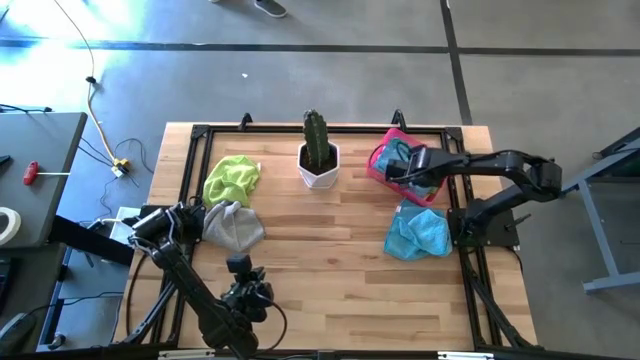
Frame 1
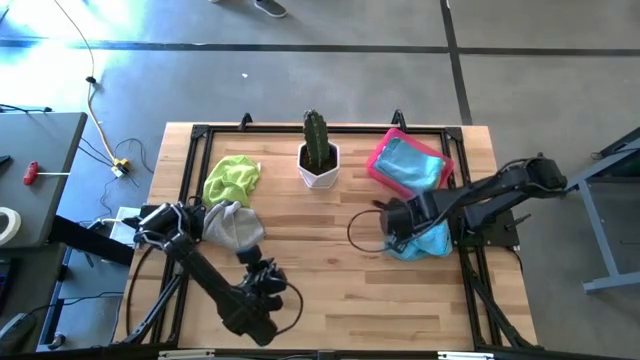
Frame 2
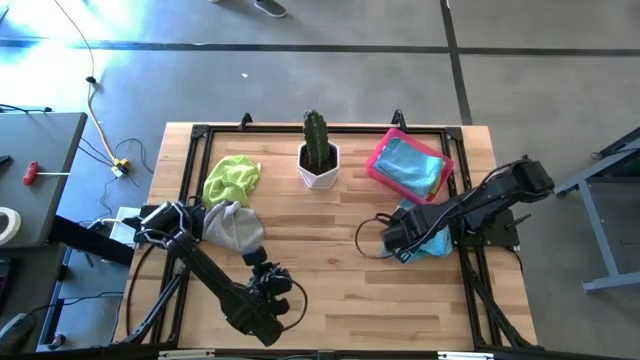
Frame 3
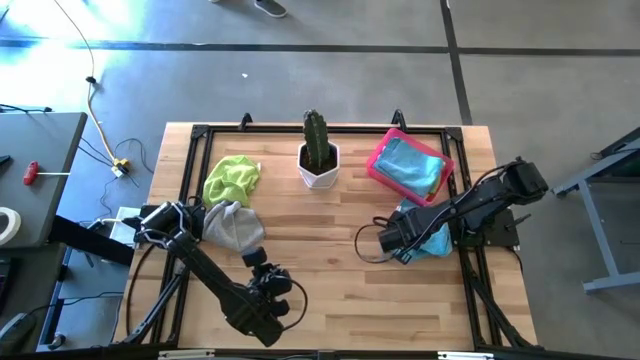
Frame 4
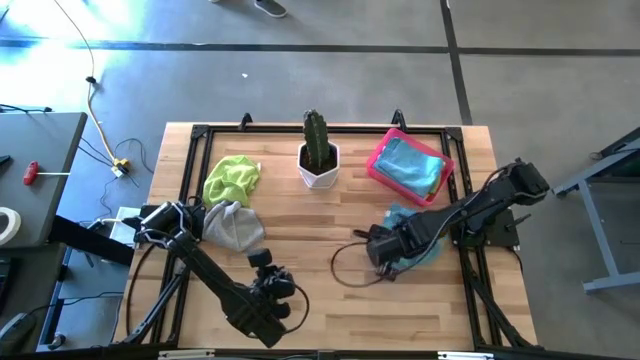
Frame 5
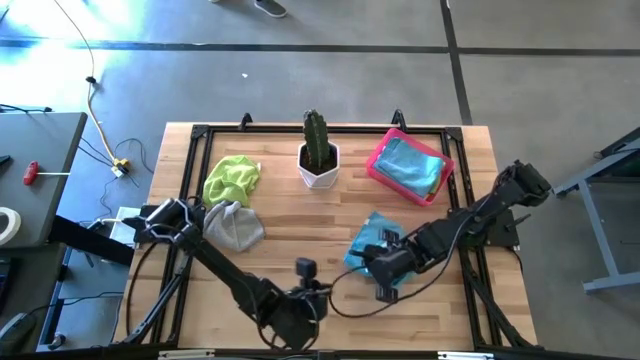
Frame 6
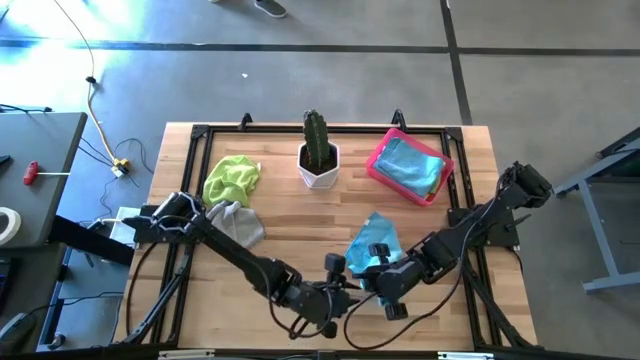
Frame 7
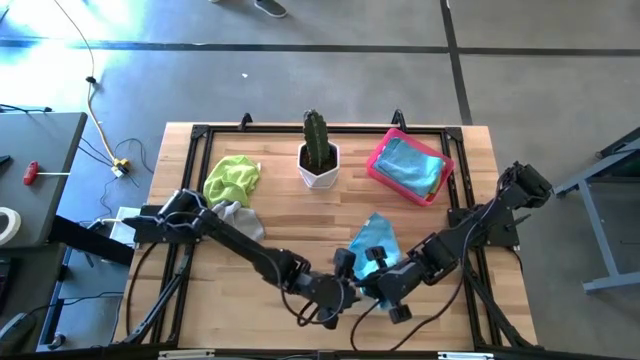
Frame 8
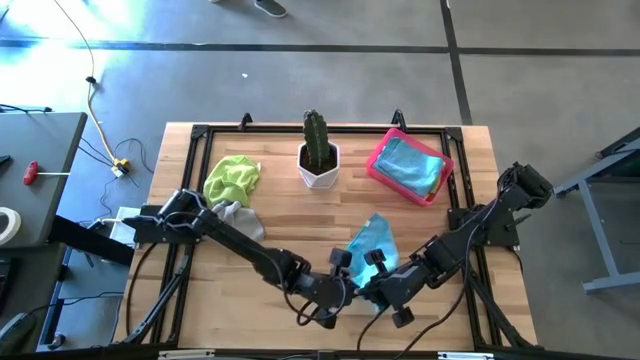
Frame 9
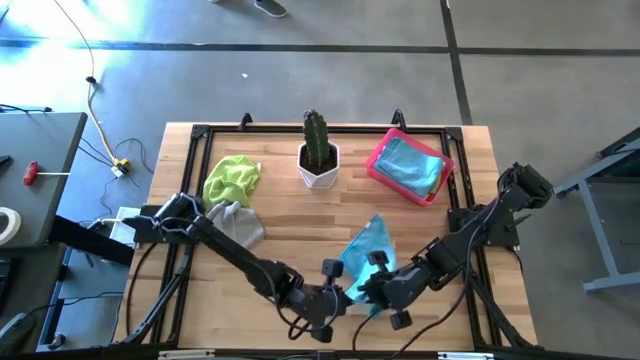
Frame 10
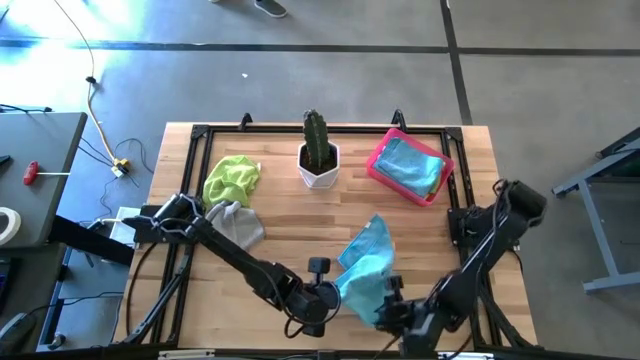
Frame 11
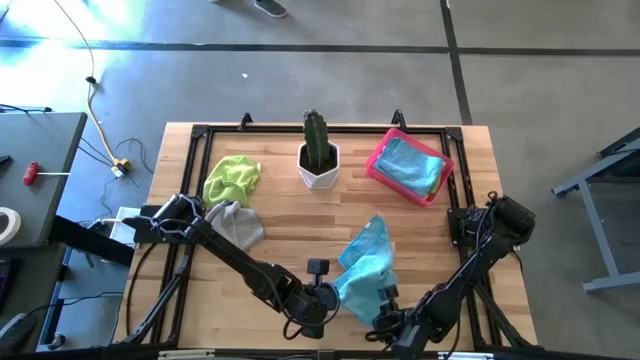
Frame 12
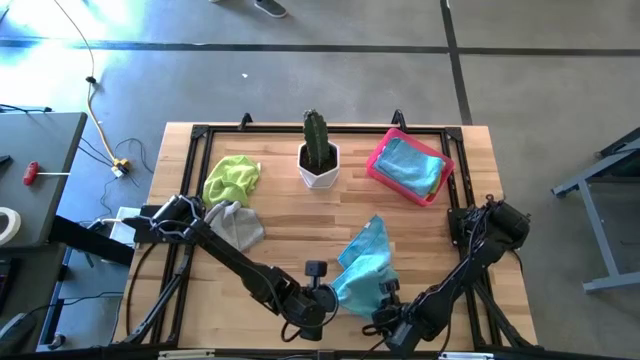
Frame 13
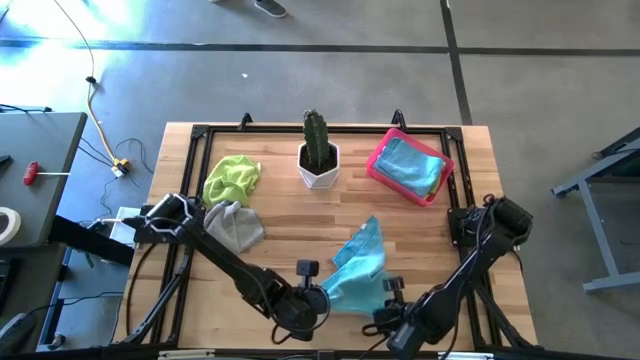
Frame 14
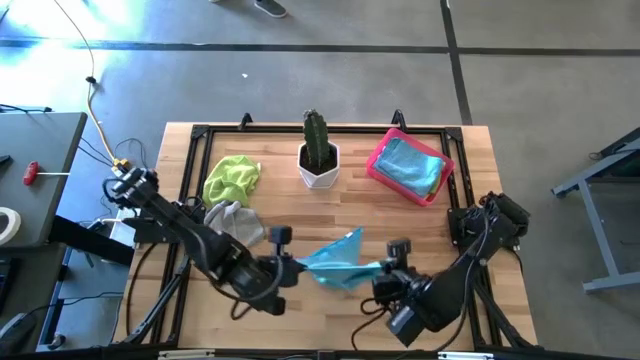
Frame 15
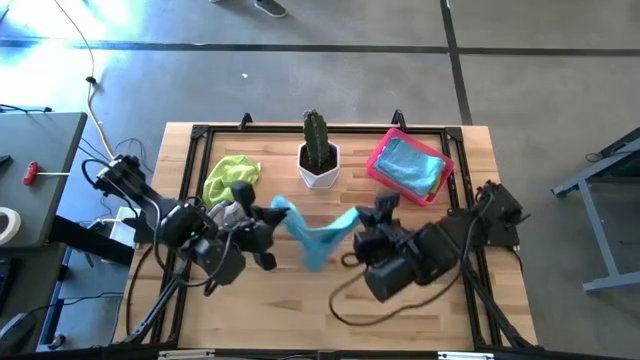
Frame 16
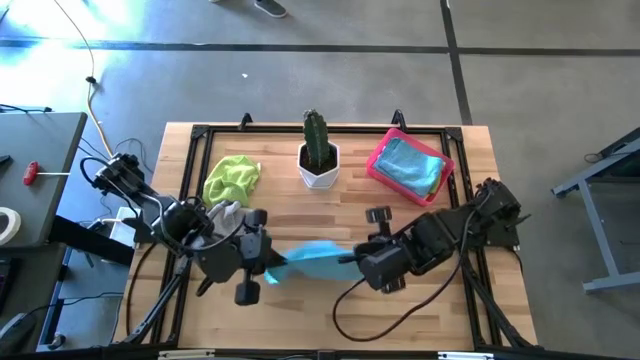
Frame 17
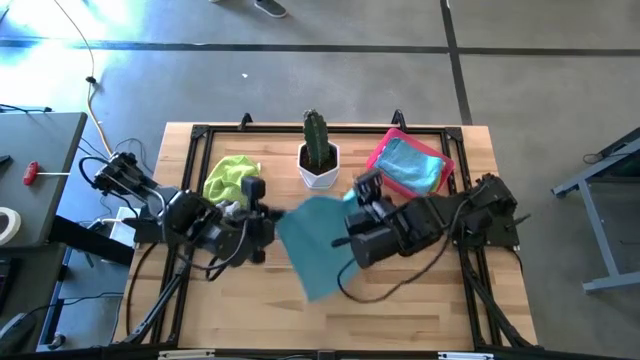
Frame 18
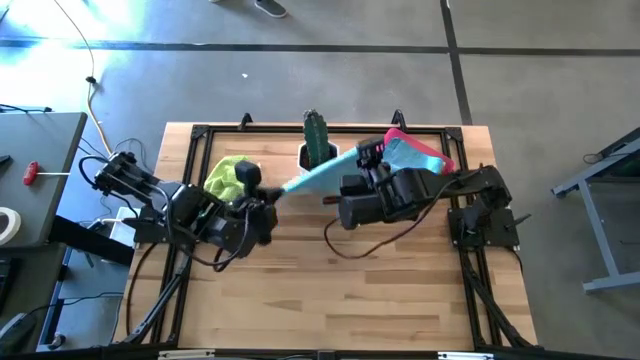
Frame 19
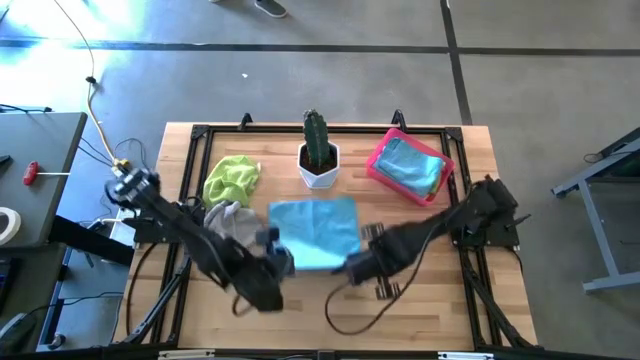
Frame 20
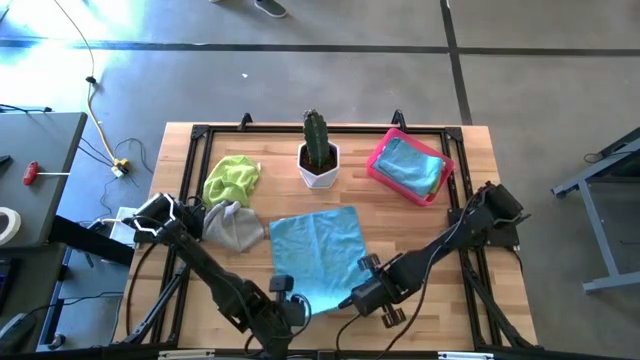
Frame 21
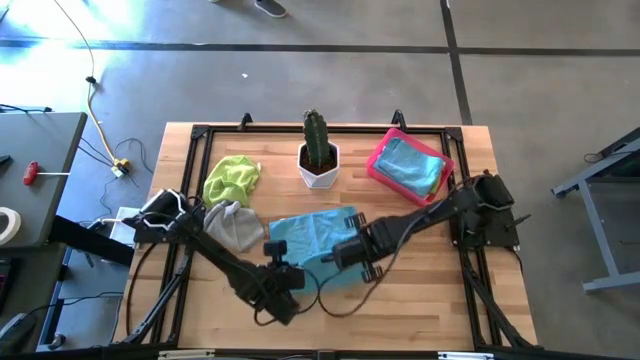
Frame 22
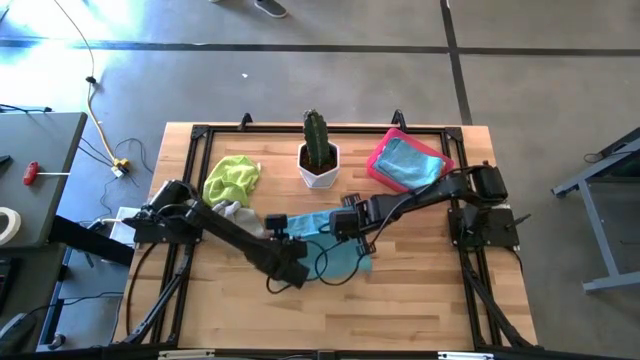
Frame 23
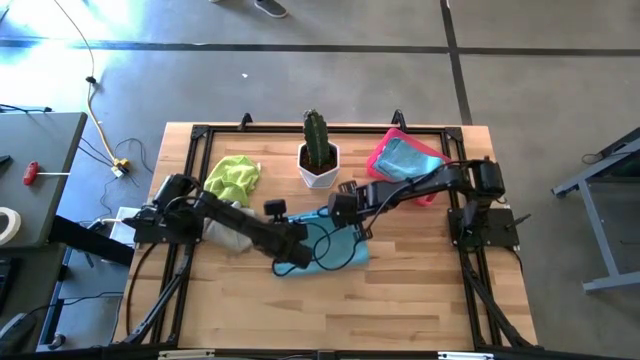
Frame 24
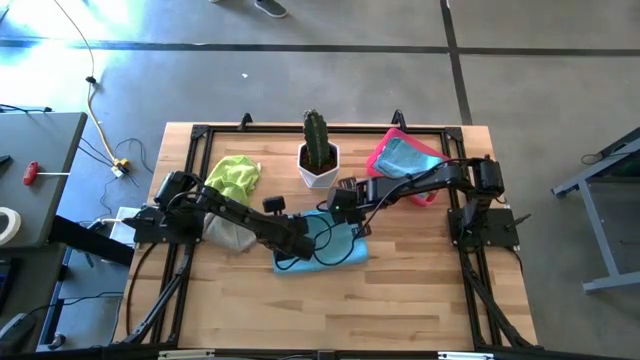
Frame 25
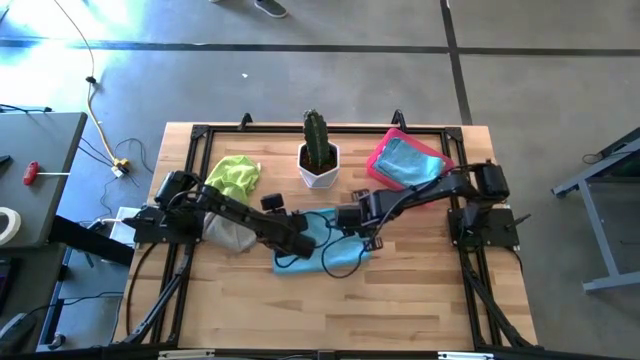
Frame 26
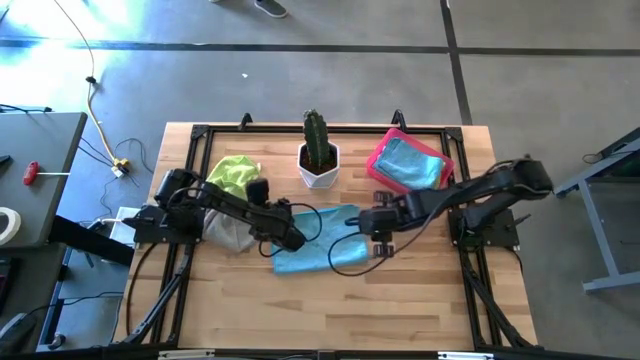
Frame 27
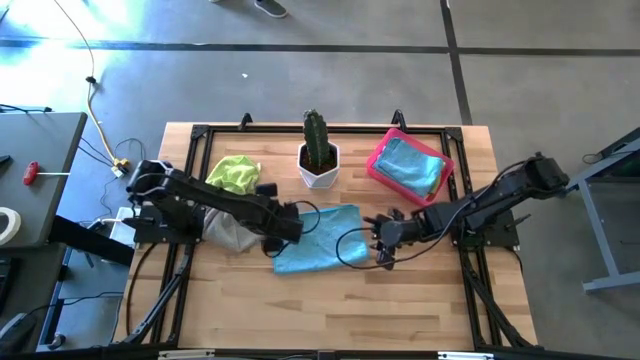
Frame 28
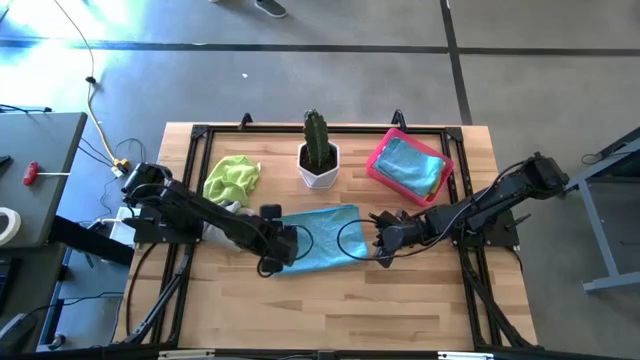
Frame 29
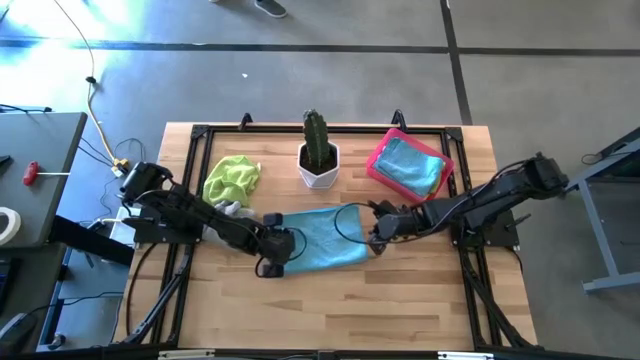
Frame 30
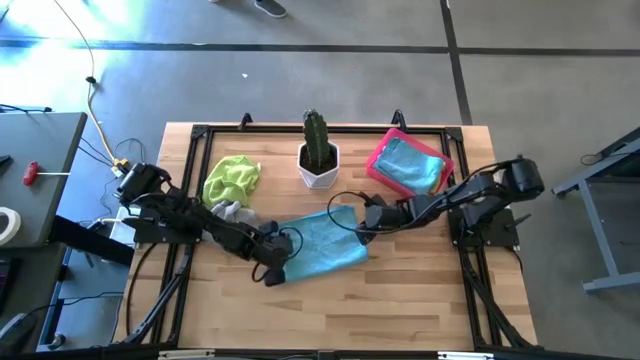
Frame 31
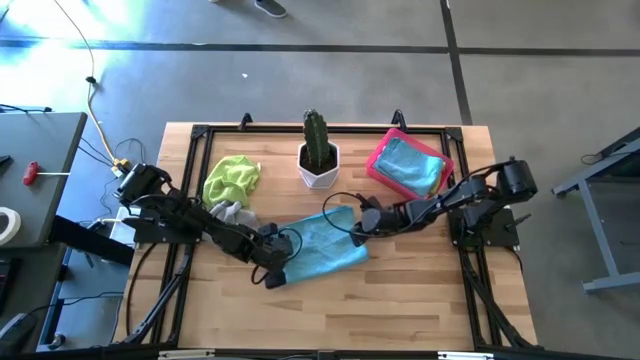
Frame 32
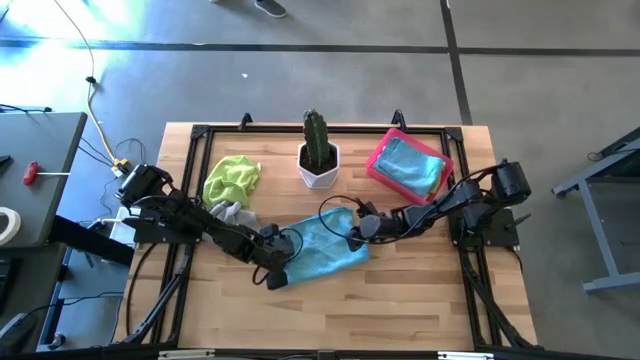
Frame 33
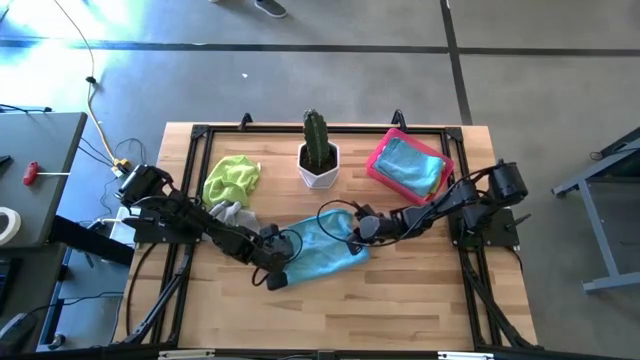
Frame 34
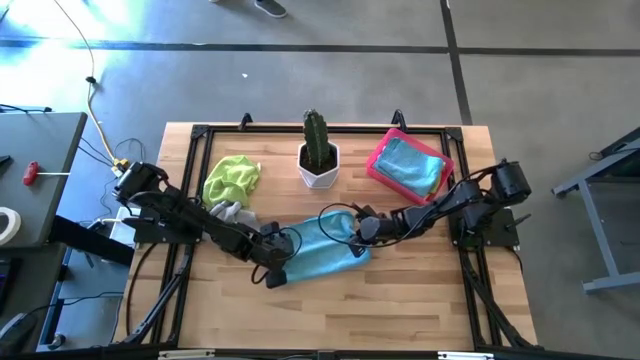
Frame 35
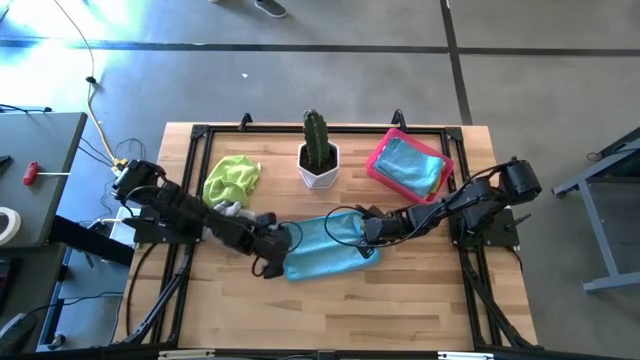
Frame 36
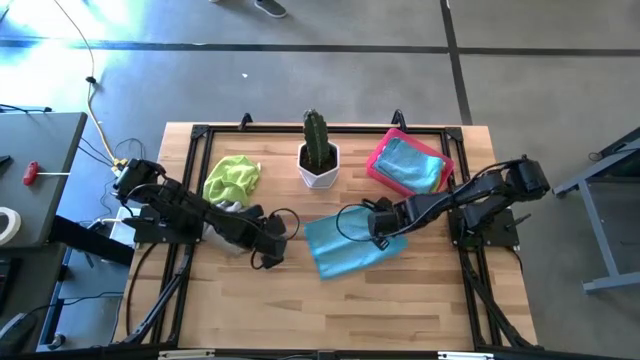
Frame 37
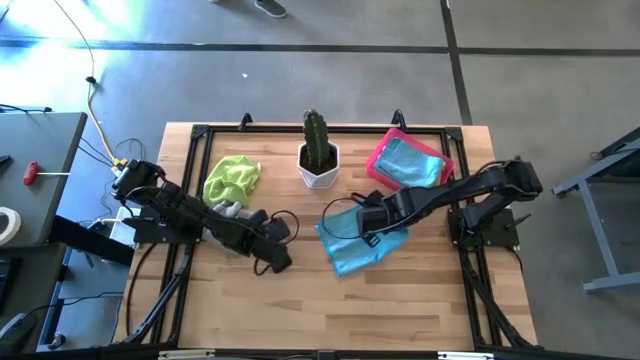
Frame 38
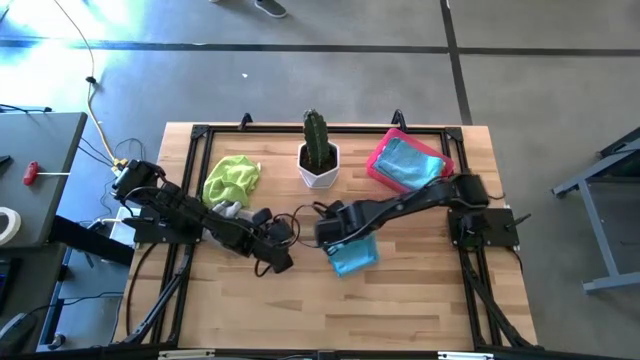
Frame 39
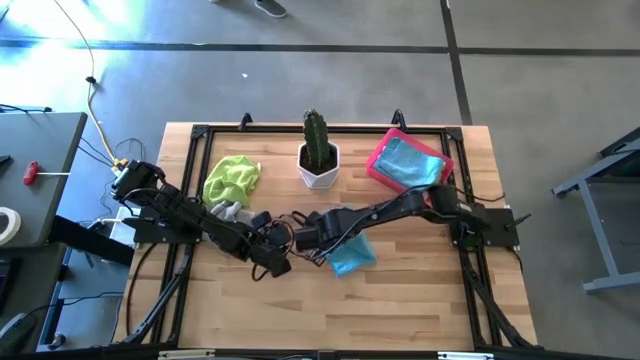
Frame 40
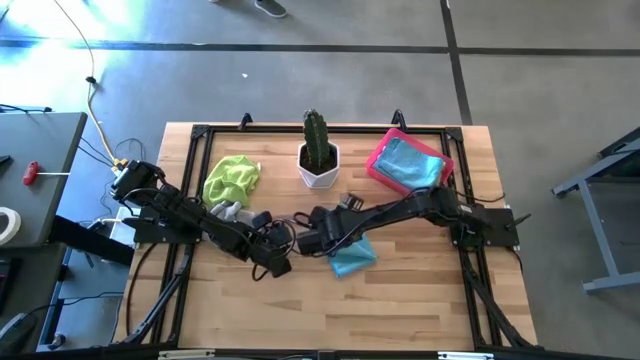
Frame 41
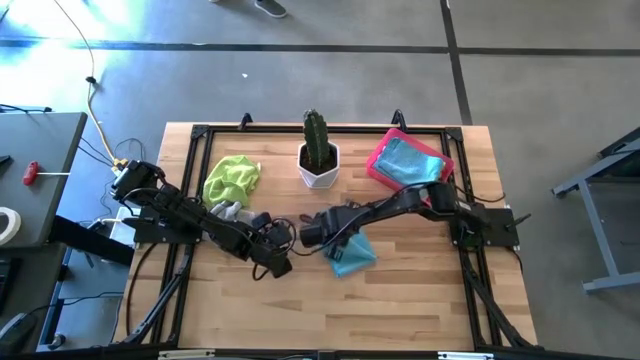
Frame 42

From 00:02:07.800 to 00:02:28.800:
Task: Fold microfiber towels
Fold the blue microfiber towel

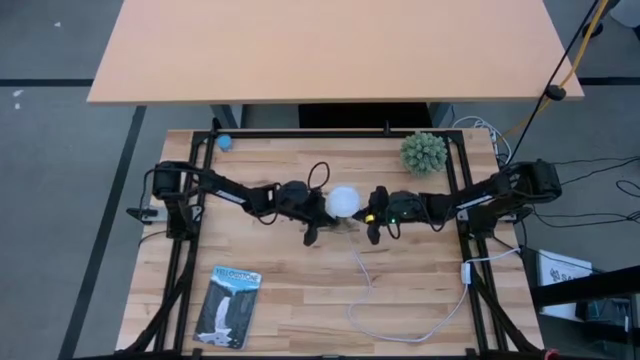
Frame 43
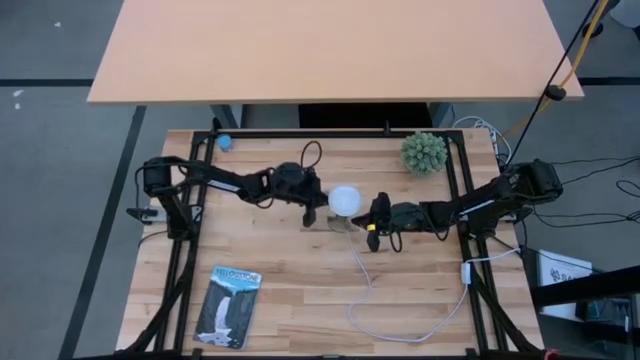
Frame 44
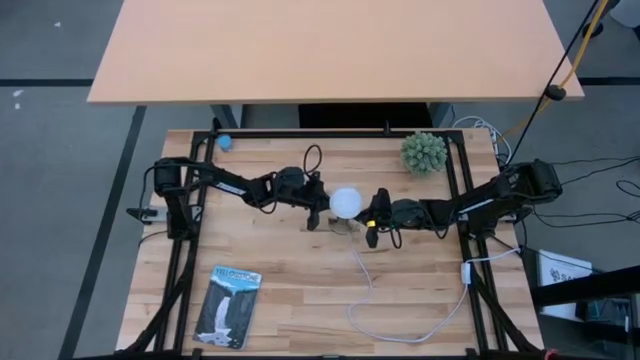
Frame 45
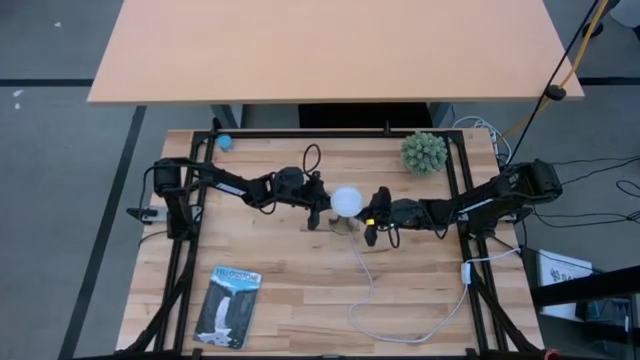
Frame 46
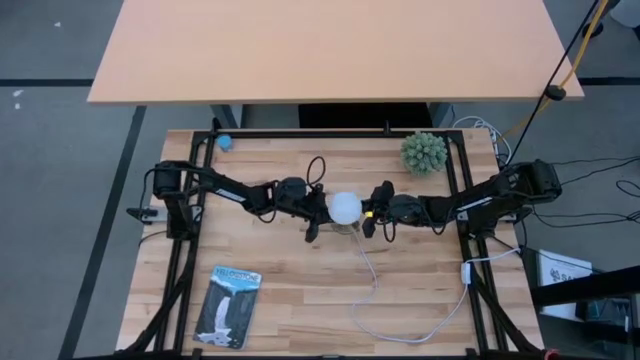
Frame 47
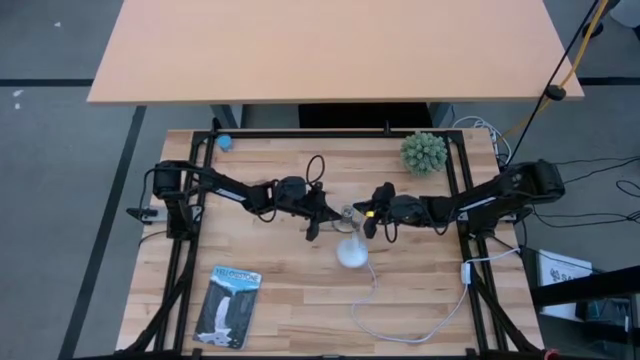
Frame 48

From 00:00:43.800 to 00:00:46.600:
Task: Screw lightbulb
Remove the lightbulb from the lamp
